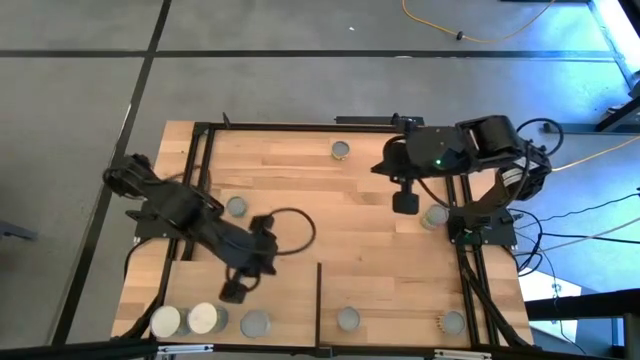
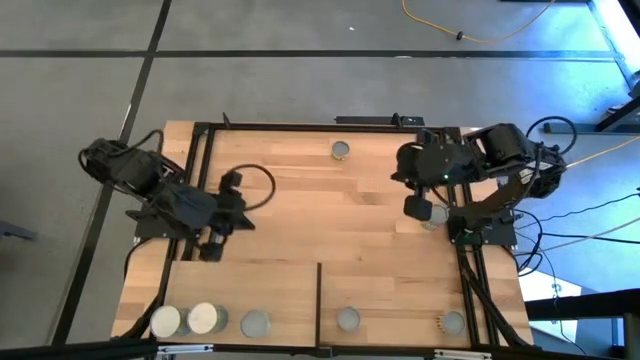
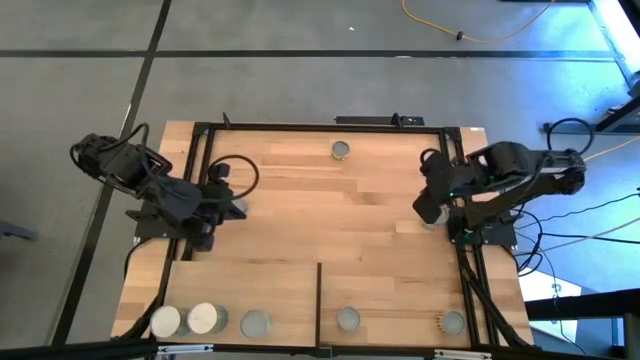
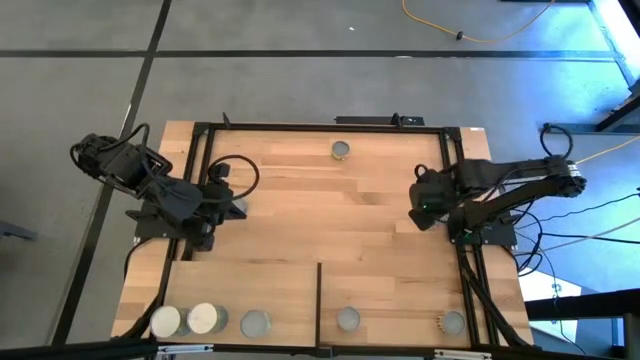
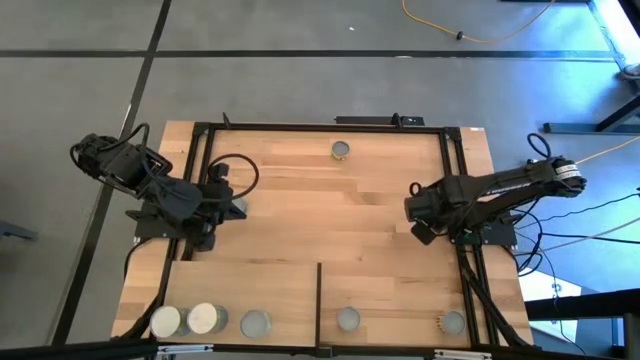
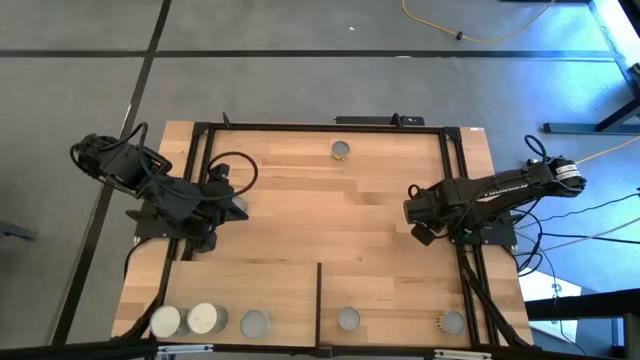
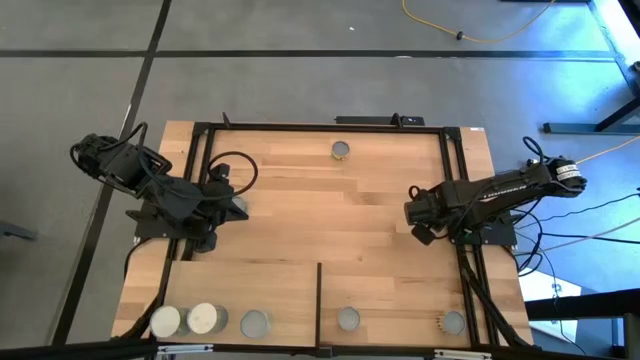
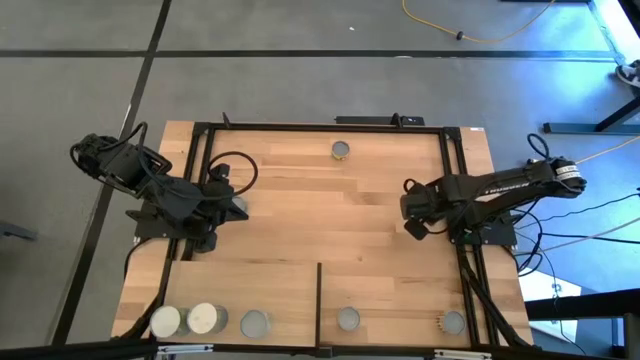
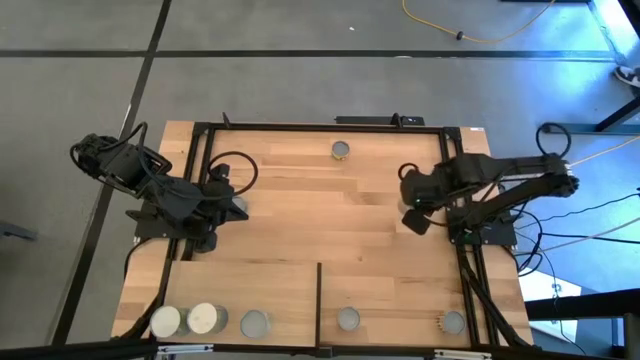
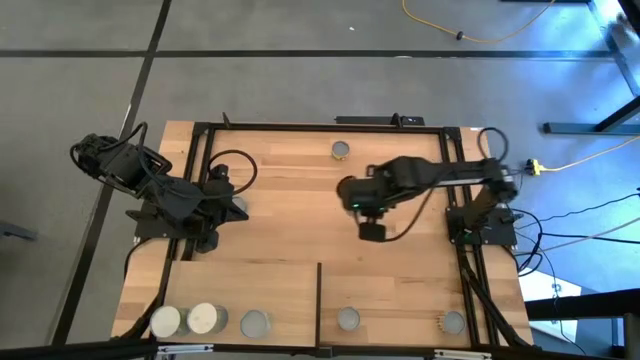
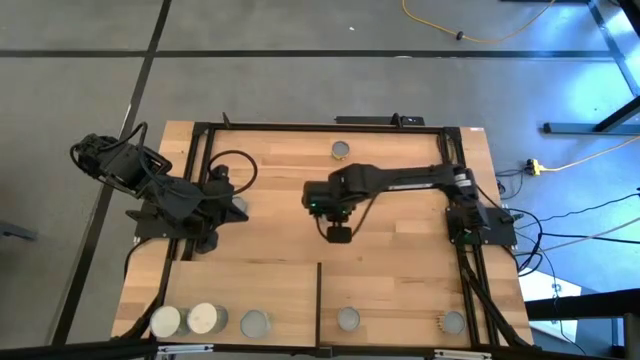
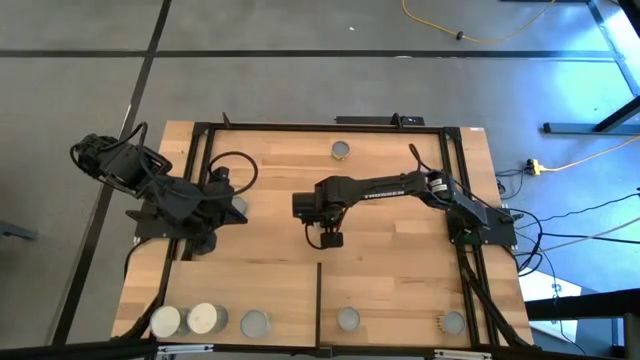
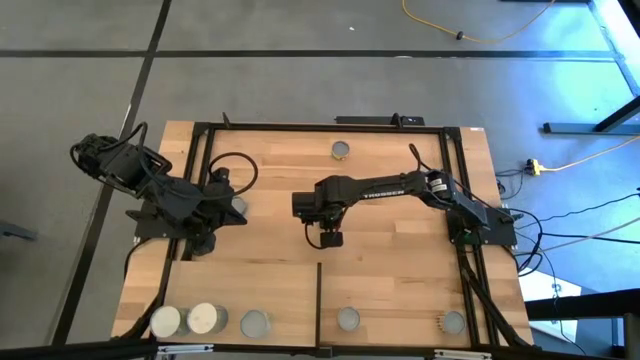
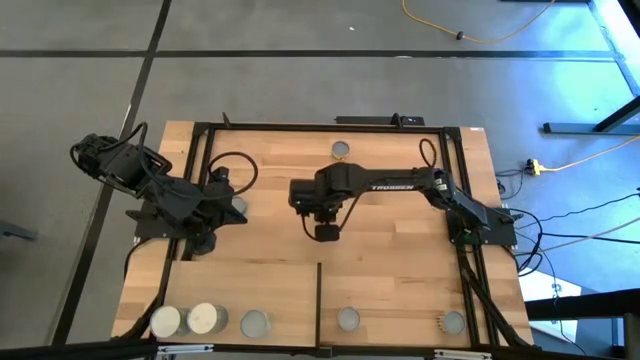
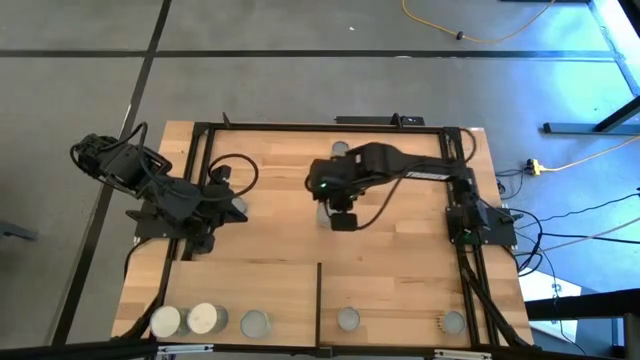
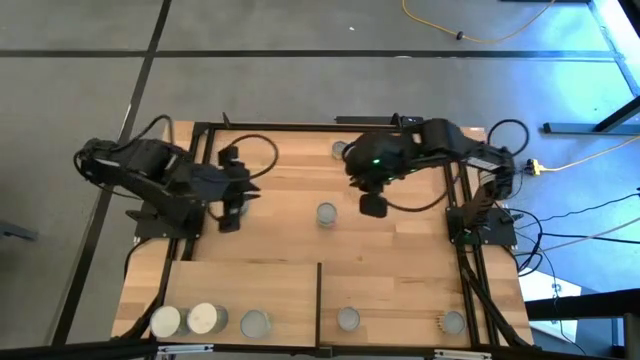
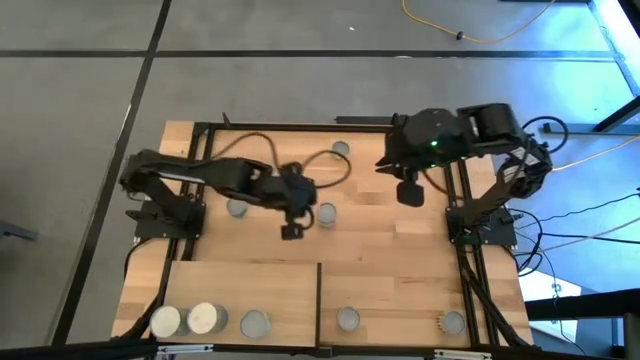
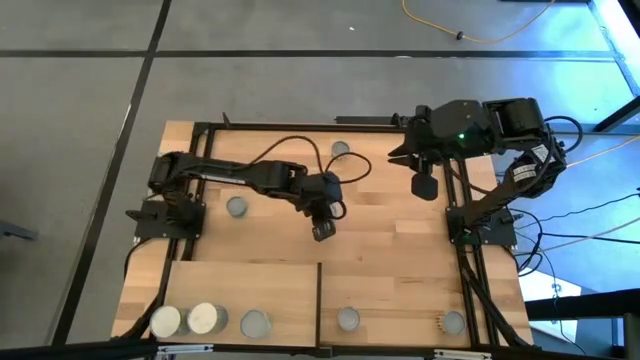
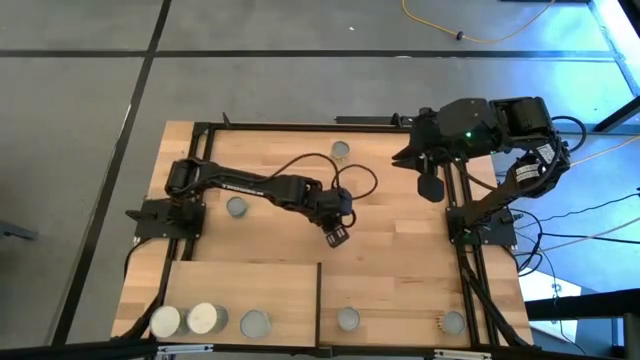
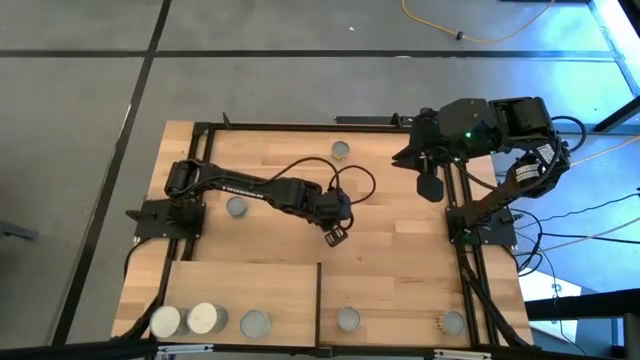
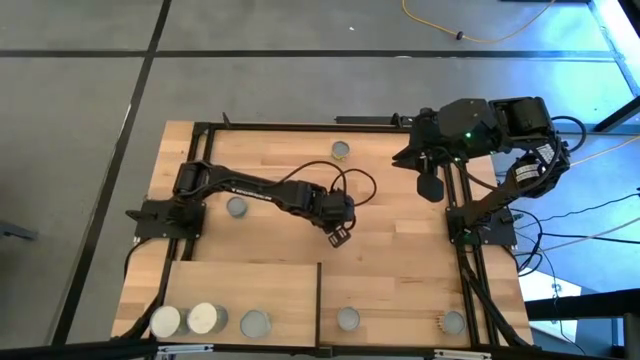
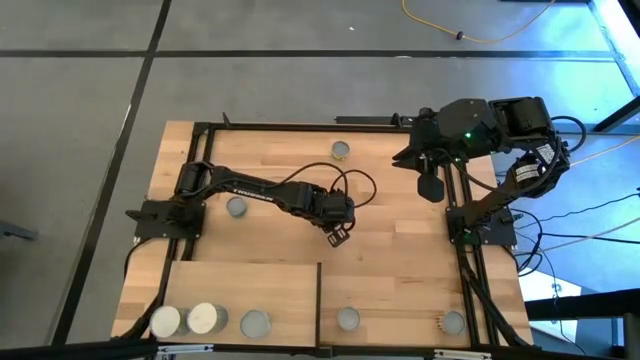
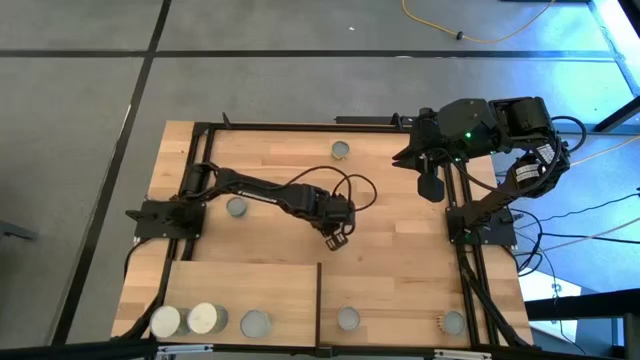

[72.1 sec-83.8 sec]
Task: Pick and place cans onto a shelf
Put the canned chicken soup on the shelf

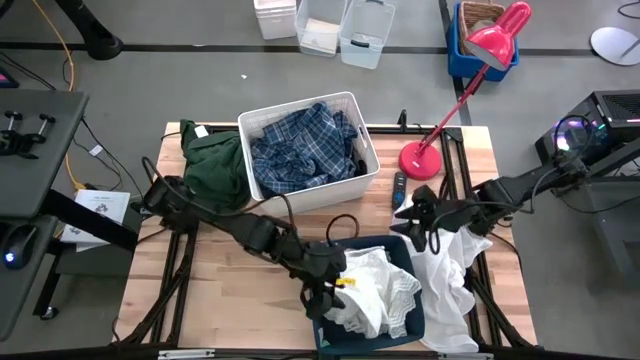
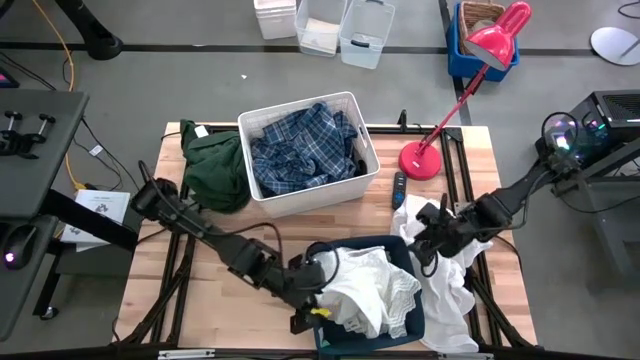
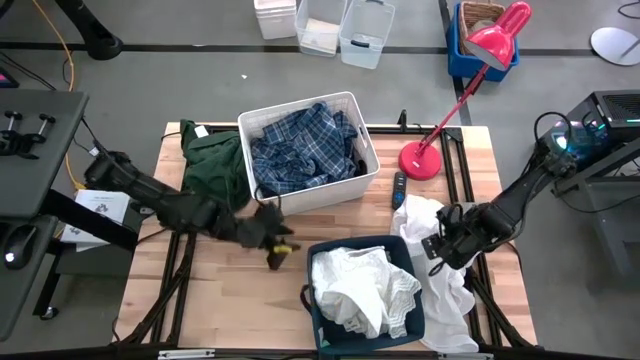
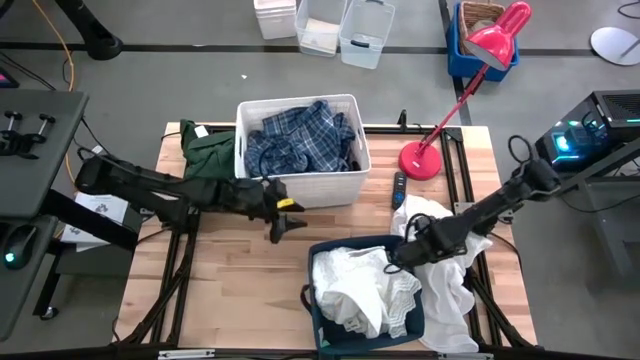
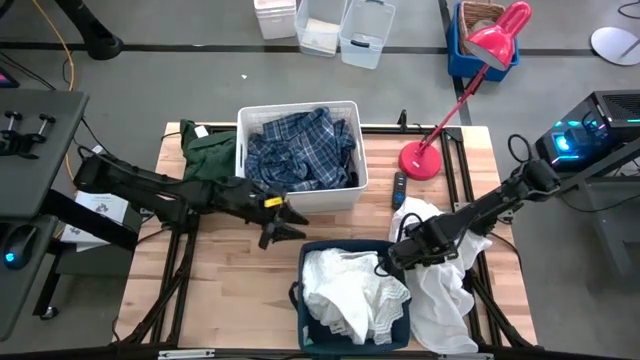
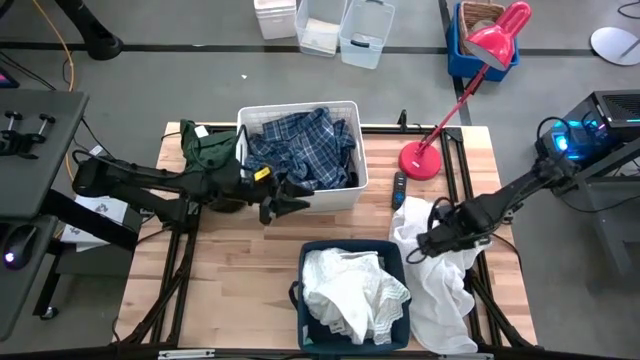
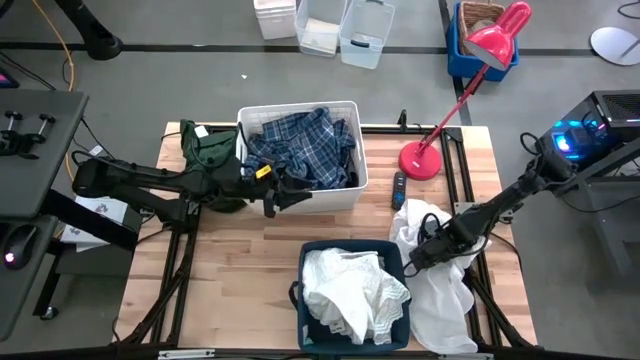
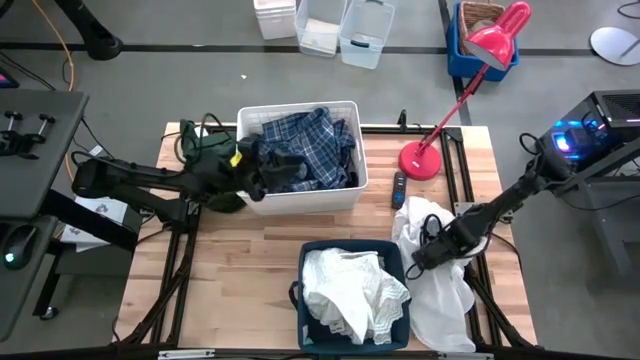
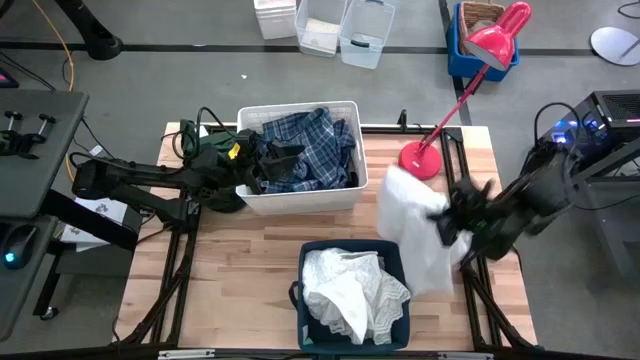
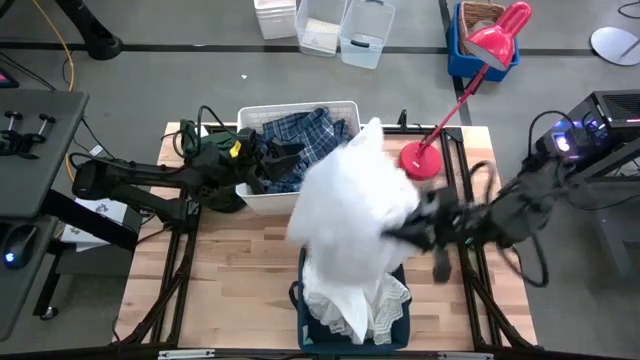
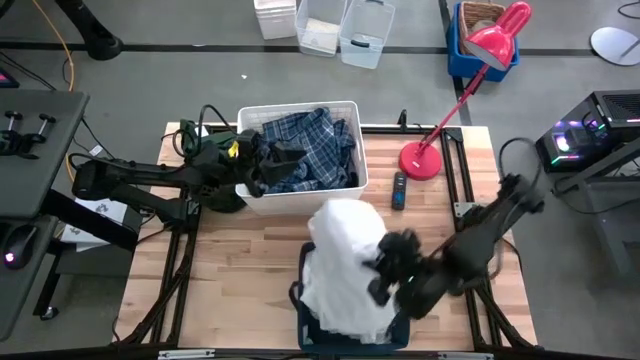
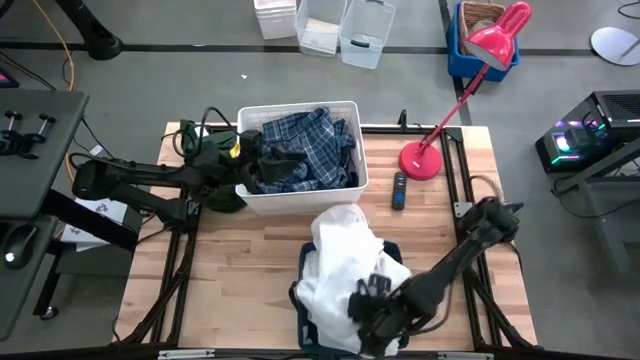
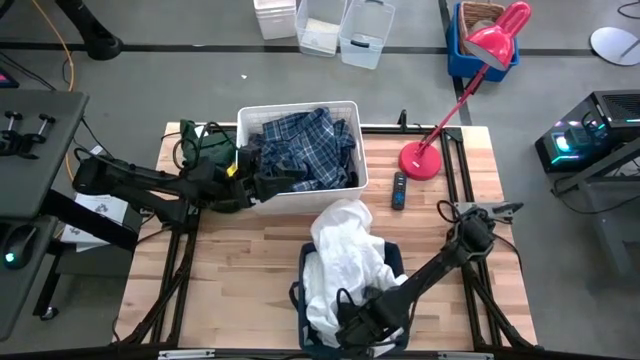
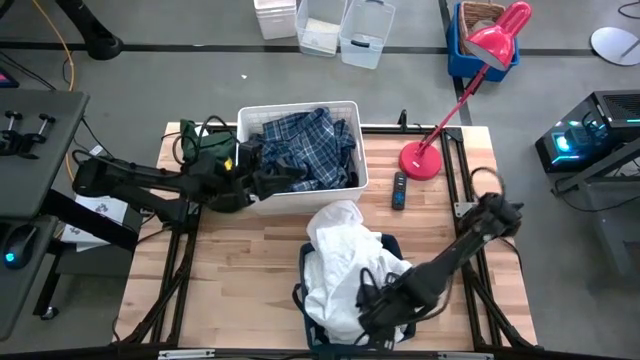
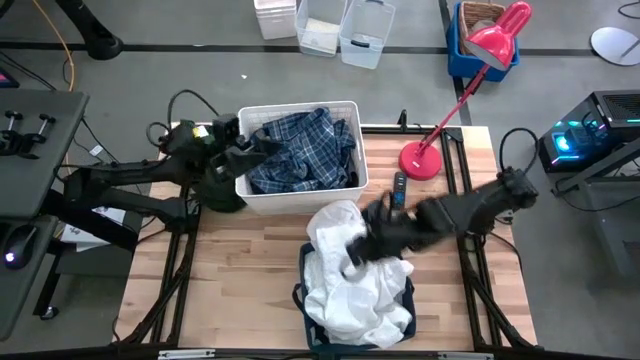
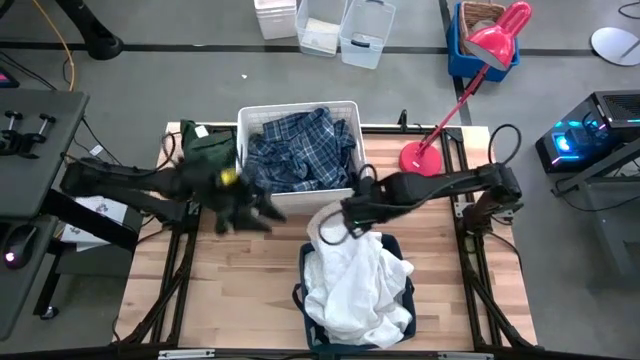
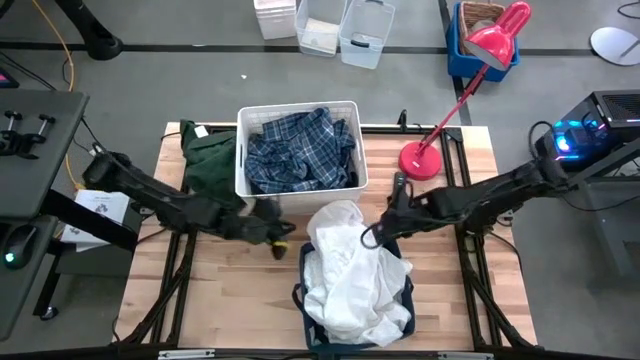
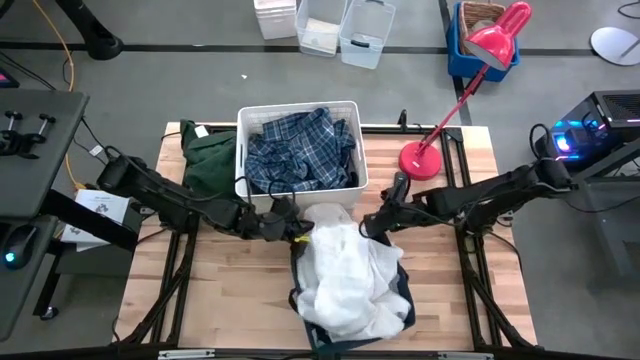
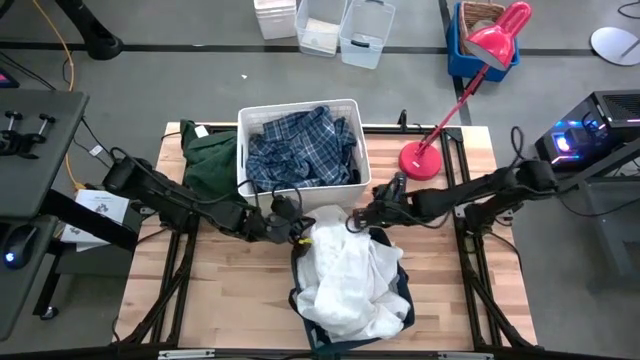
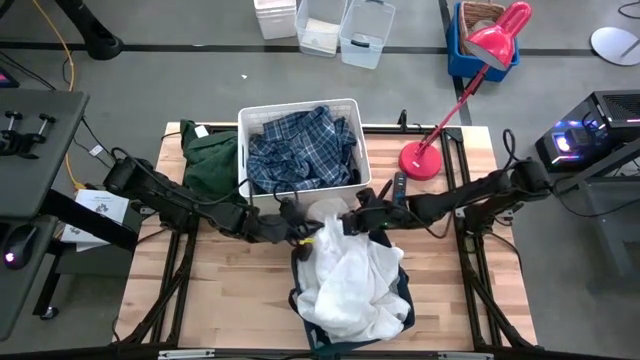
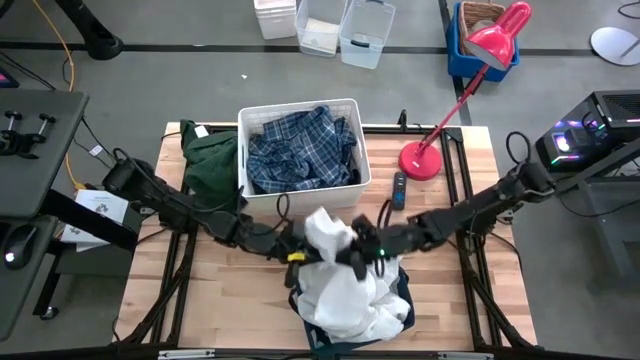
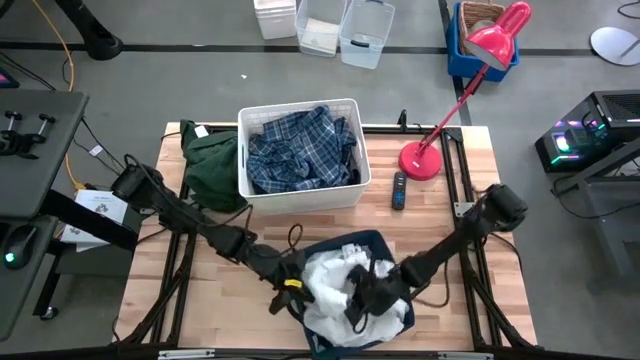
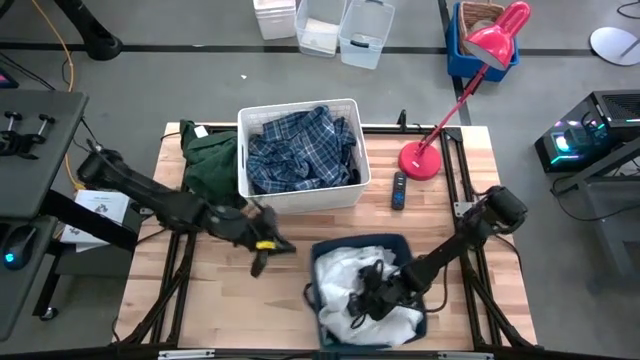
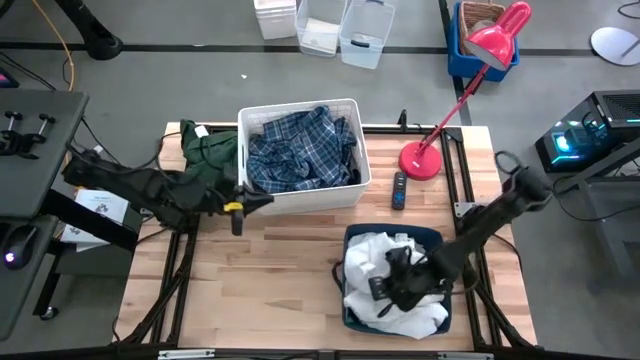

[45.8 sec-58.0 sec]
Task: Sort clothes
Put the white shirt into the blue laundry bin
